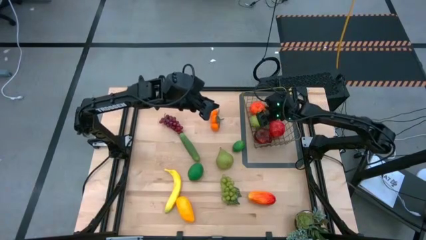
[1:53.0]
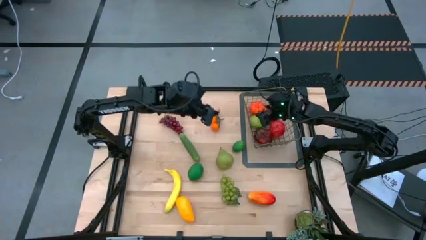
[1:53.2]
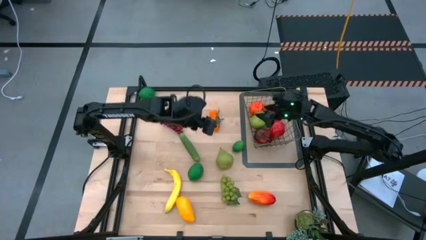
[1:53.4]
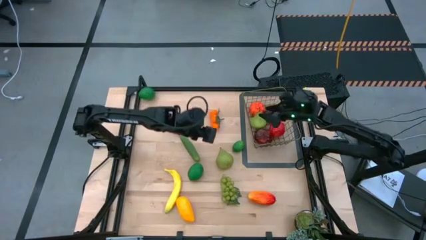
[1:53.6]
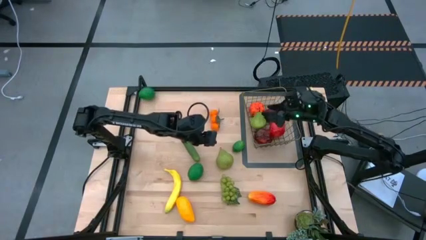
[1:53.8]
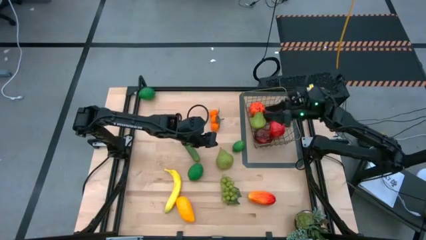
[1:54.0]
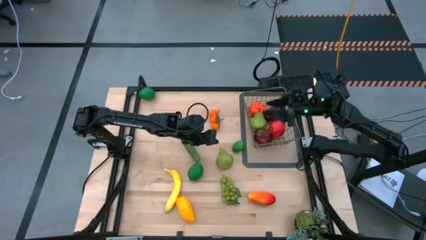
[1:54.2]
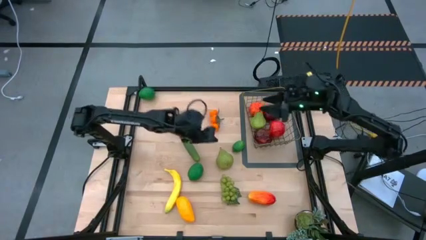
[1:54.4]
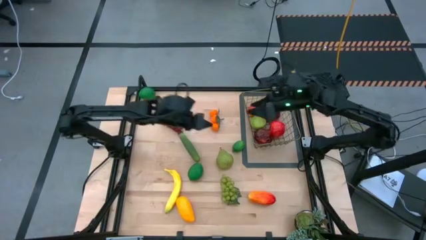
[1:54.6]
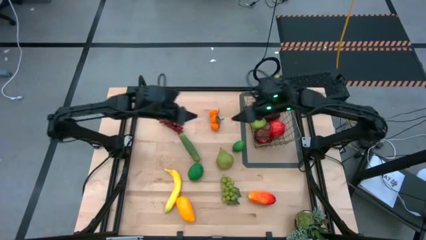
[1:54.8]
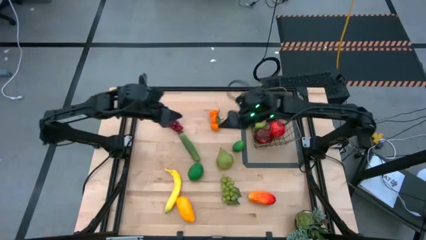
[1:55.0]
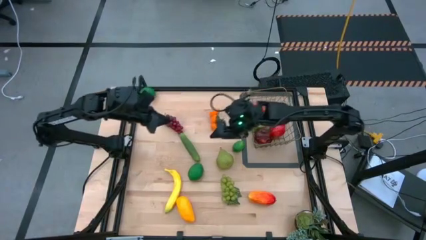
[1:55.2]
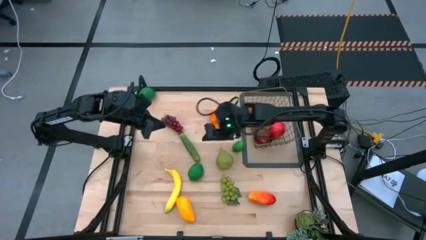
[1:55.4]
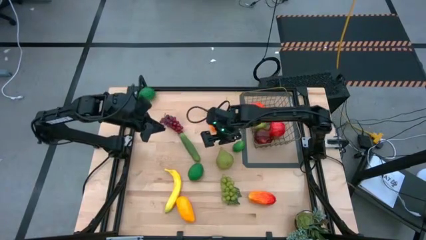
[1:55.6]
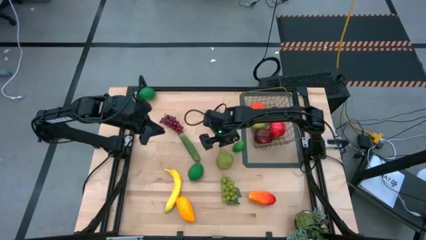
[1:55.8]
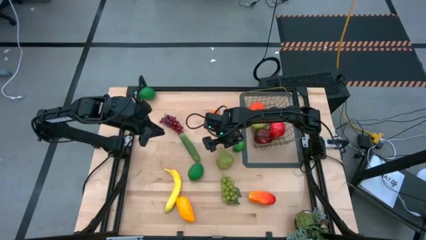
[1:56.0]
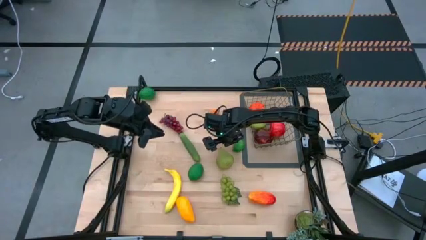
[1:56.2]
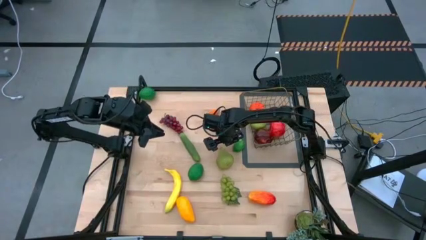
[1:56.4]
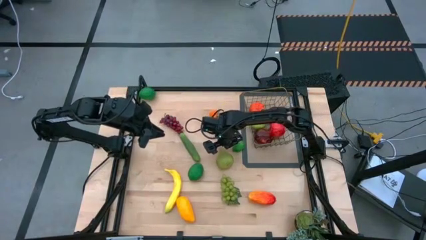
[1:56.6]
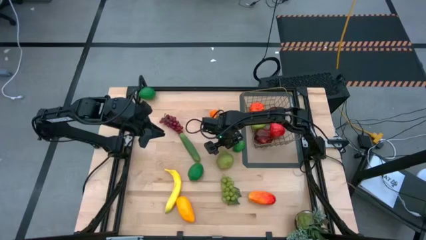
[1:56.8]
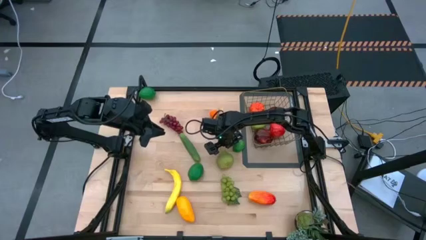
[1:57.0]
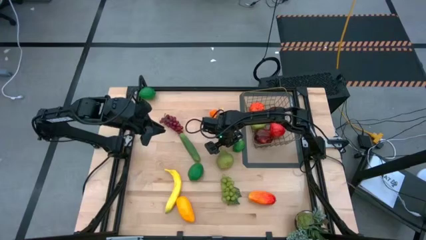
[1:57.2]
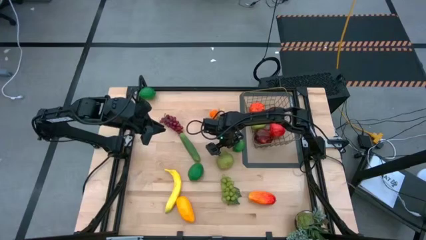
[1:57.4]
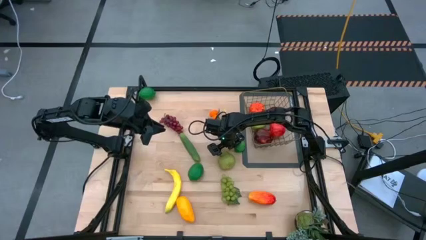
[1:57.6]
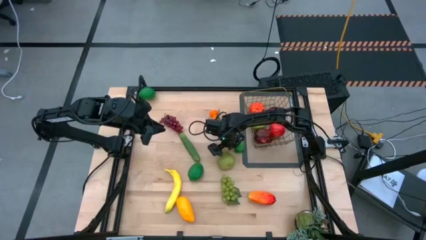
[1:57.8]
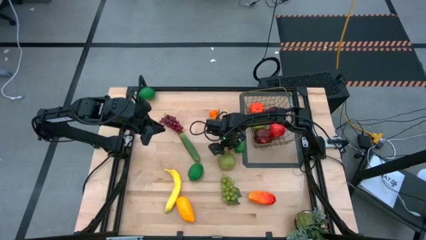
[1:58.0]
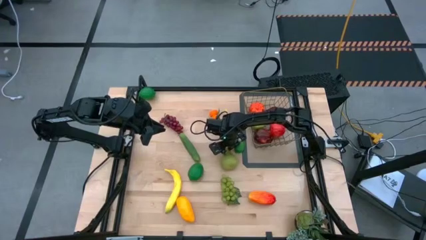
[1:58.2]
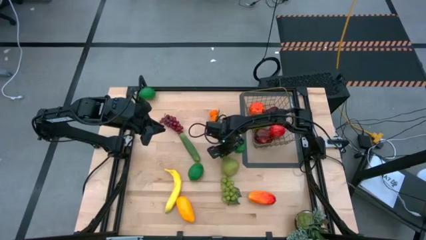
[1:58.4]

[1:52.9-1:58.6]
Task: Build produce basket
Put the green pear into the wire basket

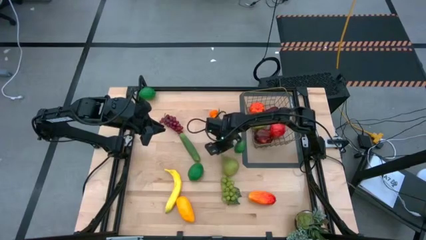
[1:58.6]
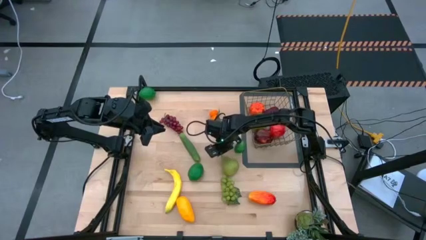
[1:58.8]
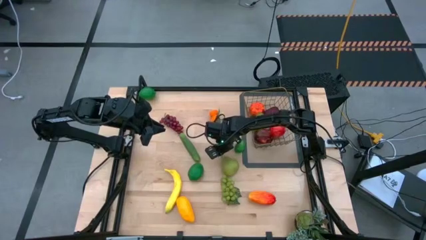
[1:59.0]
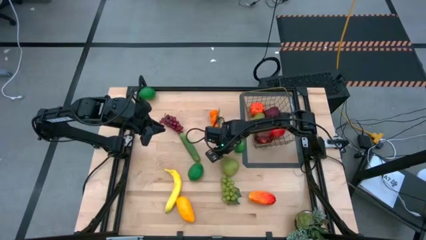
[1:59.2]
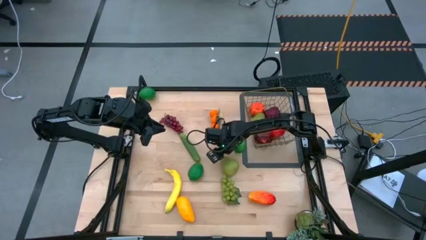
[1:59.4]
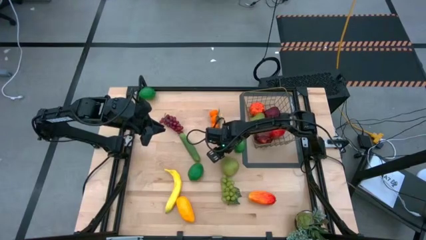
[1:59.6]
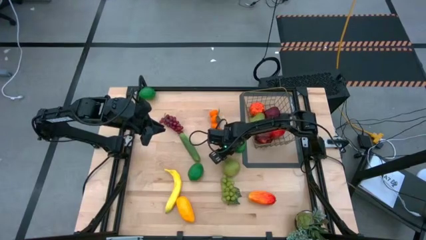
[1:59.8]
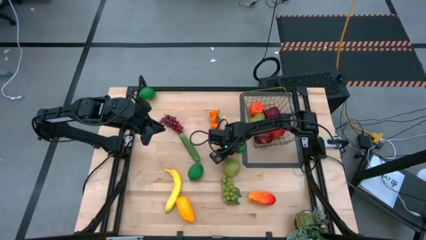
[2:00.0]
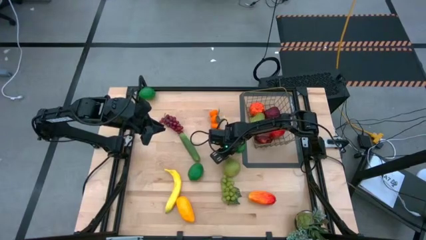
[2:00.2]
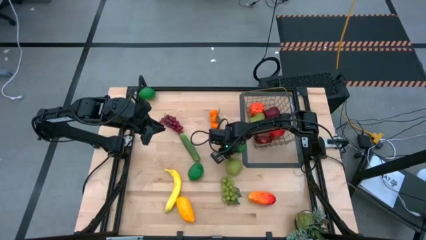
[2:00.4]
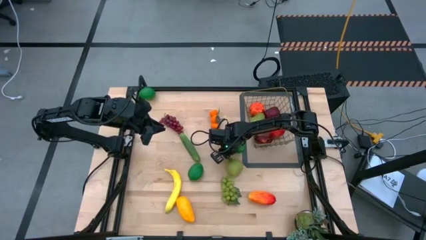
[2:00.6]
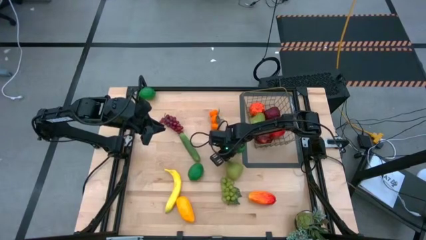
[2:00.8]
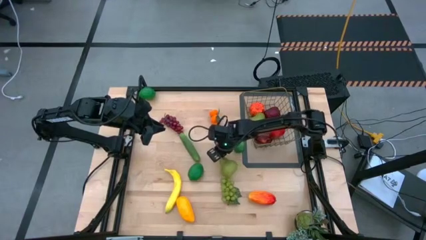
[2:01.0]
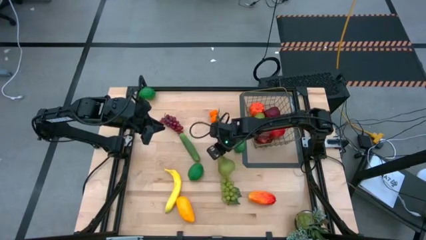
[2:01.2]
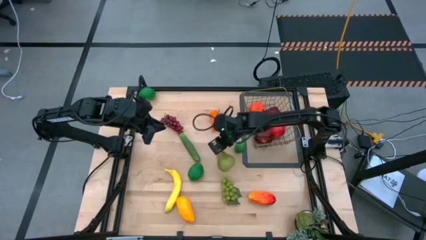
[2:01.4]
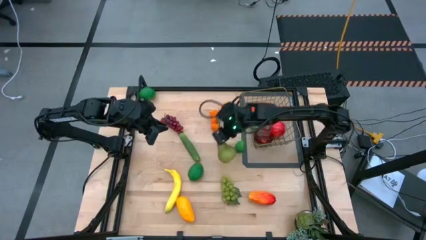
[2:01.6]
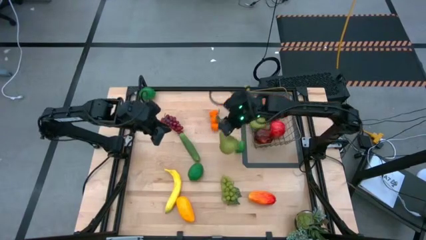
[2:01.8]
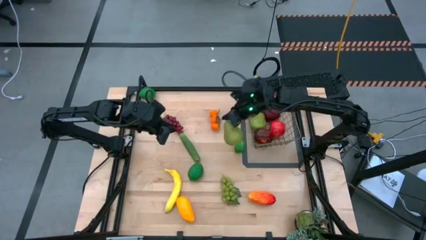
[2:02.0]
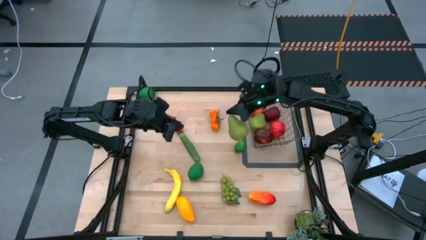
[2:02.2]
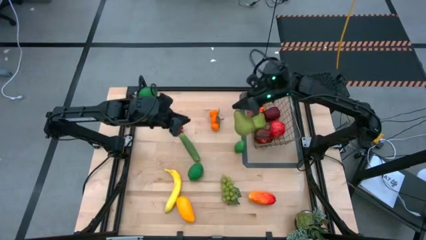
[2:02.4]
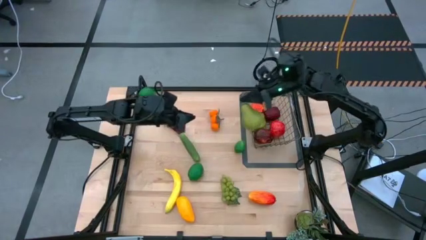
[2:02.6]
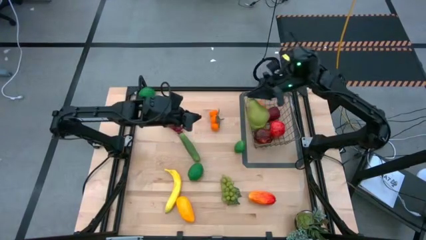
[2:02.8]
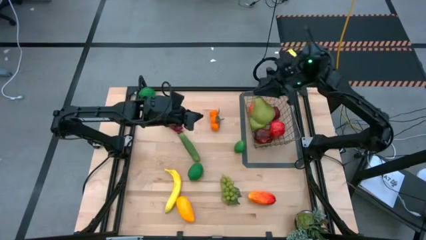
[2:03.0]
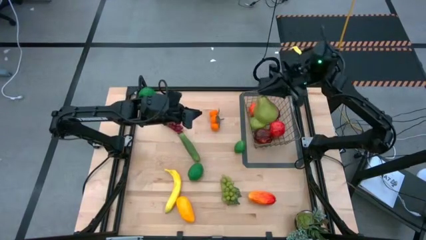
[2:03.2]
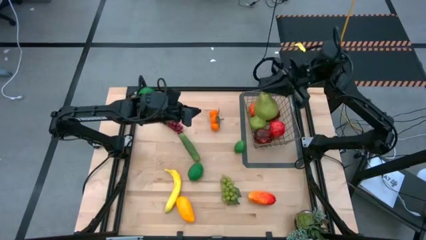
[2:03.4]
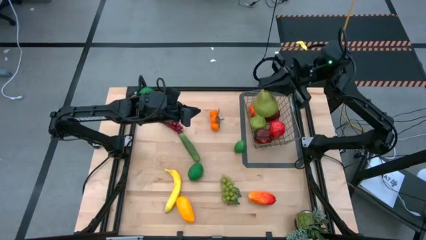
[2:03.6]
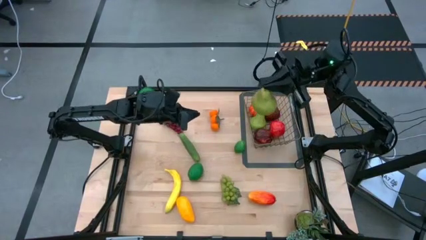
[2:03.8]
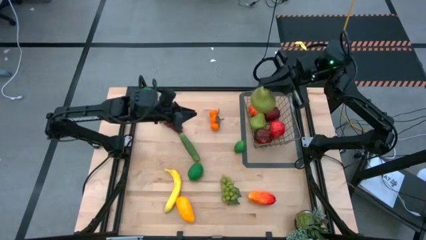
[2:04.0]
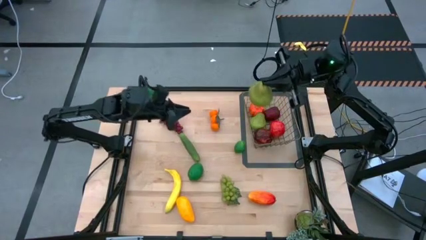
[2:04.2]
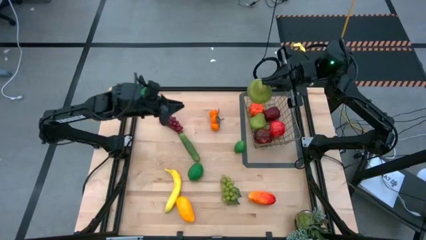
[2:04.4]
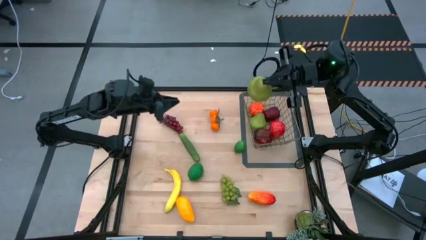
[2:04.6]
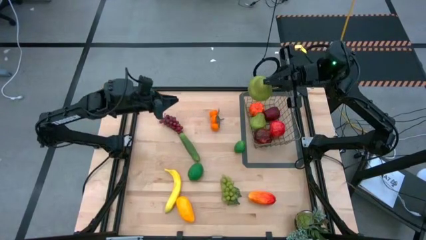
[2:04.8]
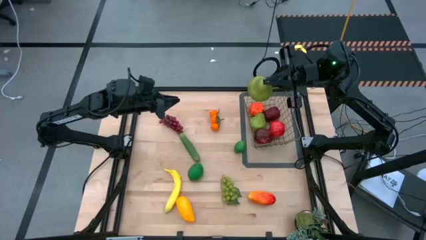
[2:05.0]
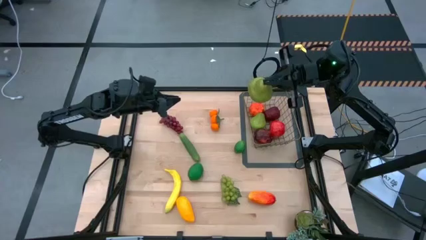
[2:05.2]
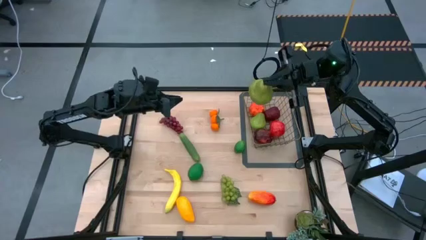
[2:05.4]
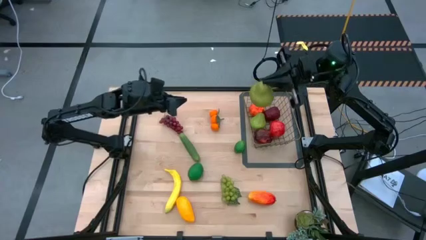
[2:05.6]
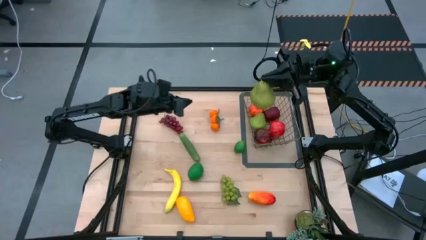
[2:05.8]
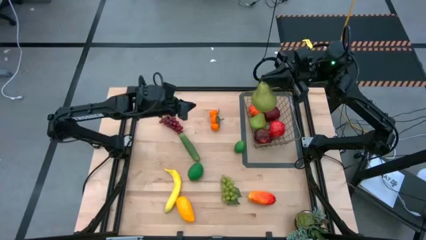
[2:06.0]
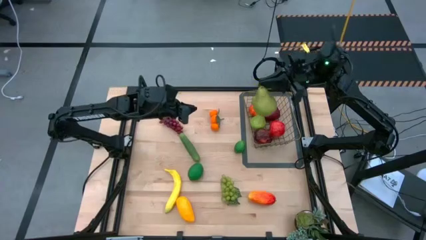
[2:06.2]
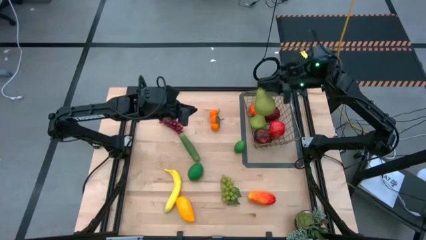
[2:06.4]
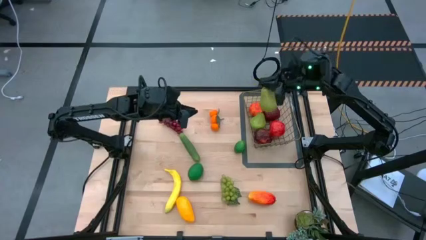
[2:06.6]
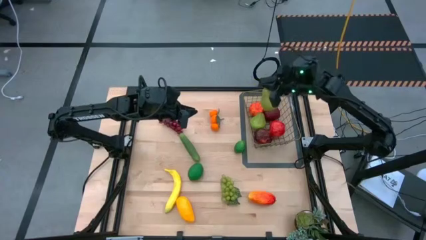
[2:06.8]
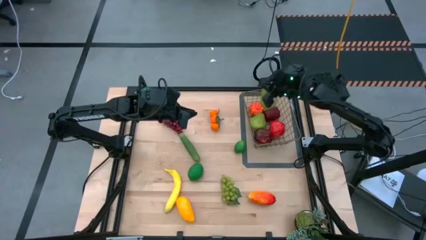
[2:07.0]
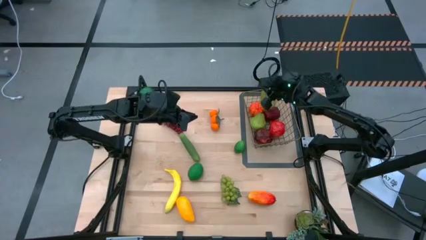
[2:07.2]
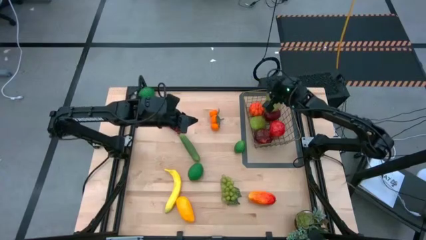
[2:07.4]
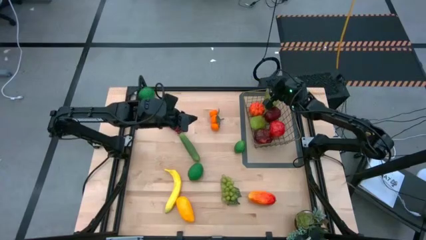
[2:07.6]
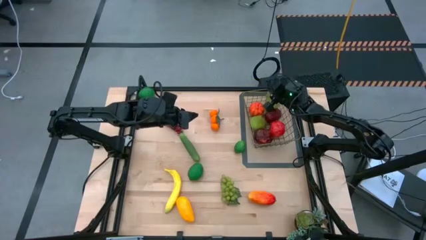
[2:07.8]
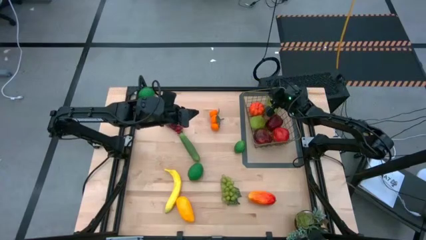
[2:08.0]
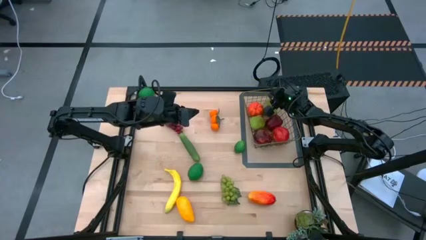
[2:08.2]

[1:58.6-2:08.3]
Put the green pear into the wire basket

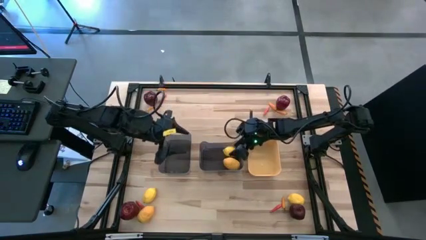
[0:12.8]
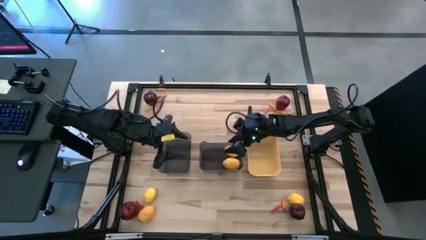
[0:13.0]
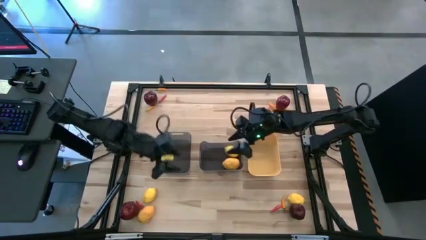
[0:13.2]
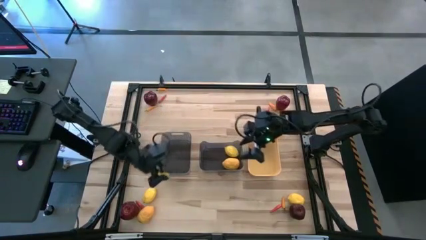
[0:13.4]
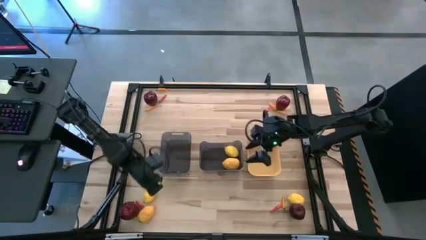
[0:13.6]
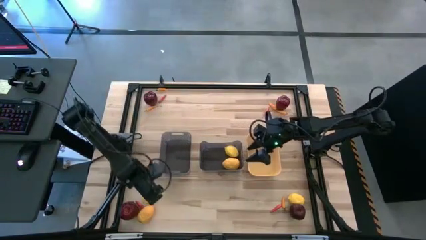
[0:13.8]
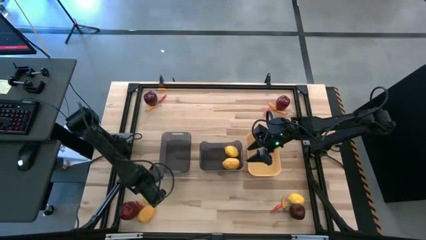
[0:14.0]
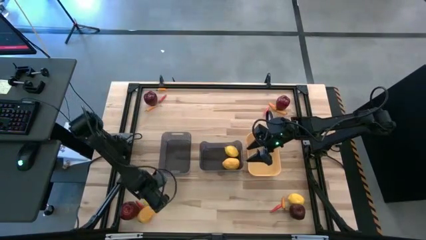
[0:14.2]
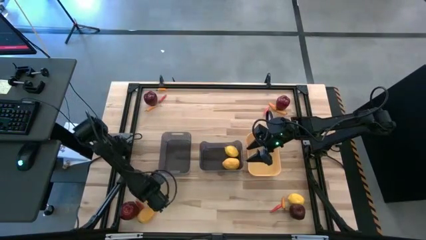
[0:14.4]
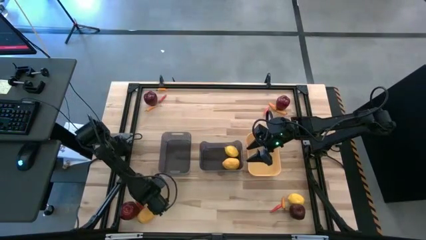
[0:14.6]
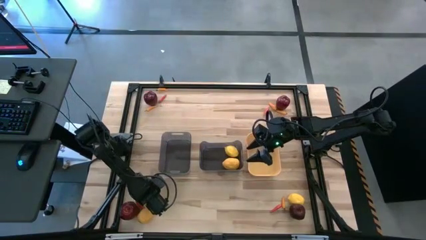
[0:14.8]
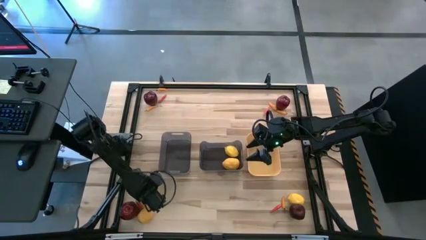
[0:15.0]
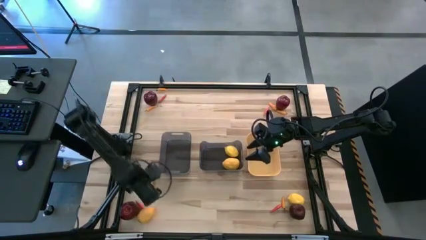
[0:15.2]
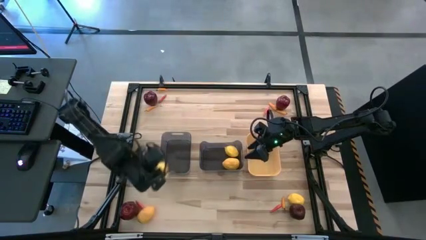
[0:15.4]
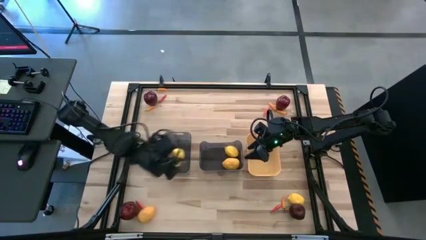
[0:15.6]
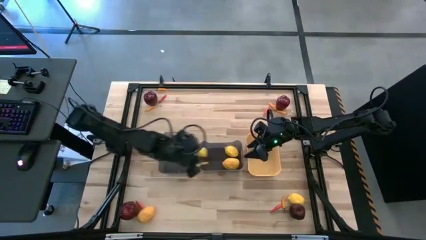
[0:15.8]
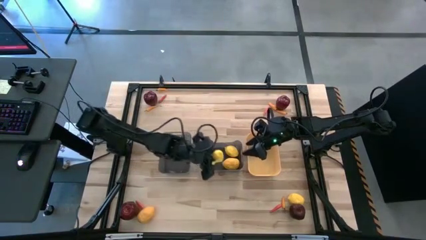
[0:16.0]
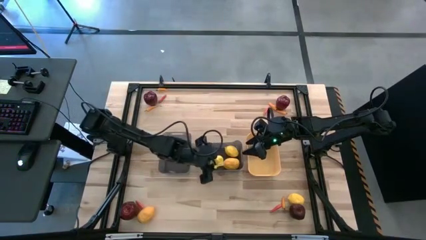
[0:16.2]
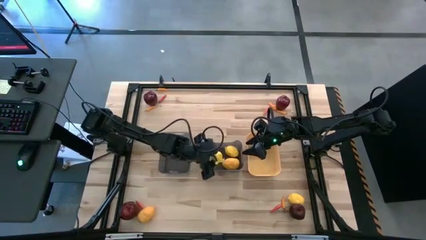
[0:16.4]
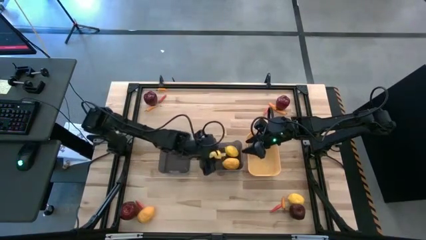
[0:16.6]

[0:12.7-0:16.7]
Task: Sort produce into baskets
Put the lemon into the right black bin
